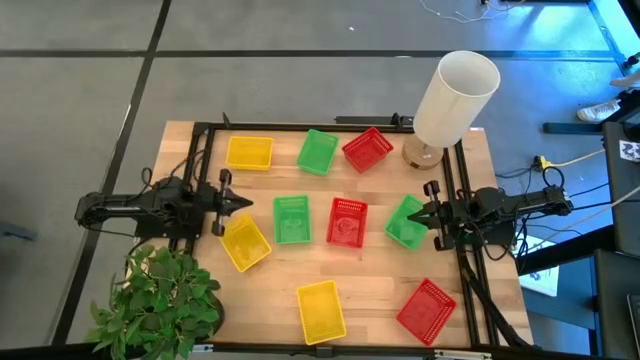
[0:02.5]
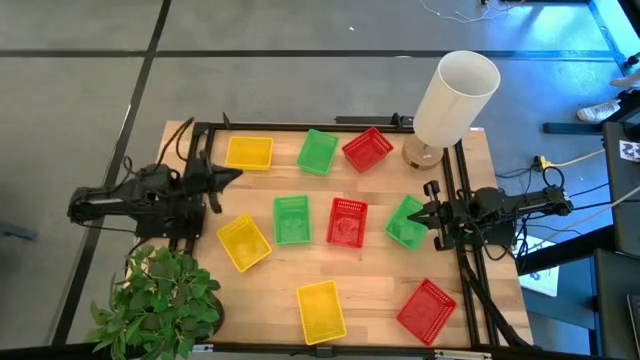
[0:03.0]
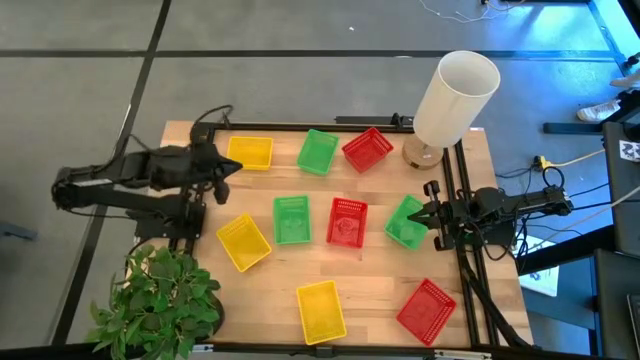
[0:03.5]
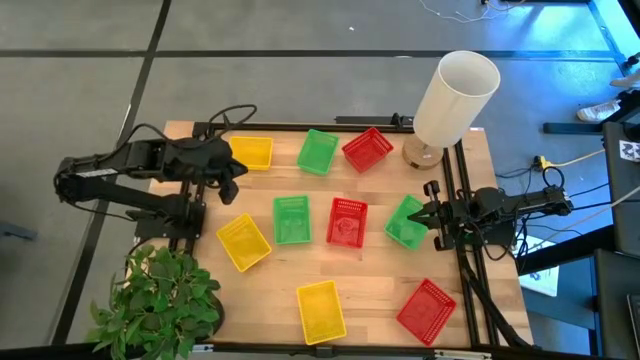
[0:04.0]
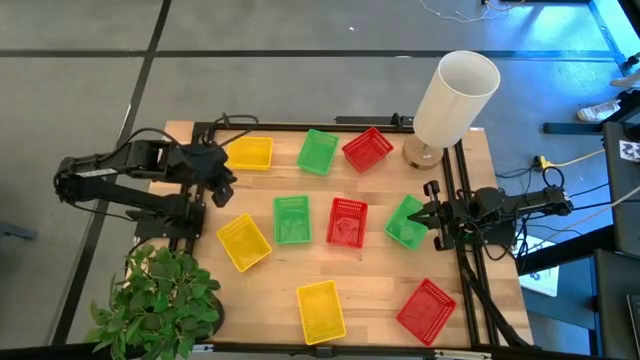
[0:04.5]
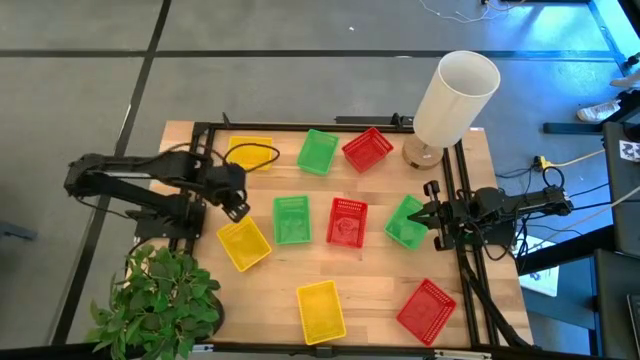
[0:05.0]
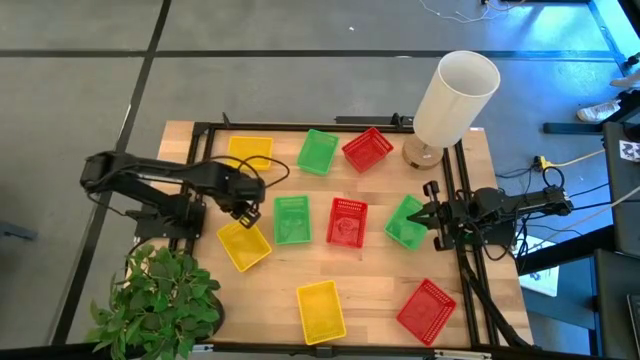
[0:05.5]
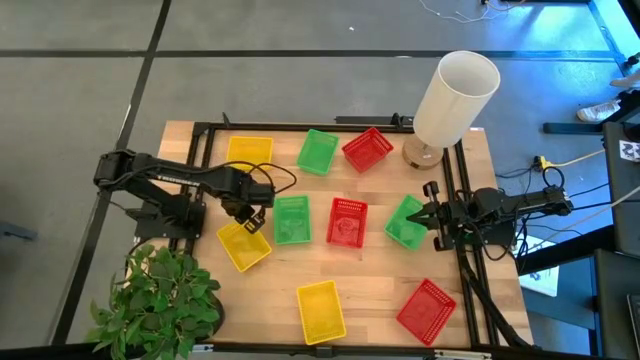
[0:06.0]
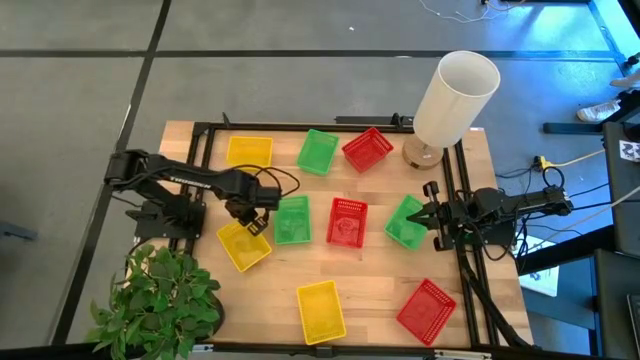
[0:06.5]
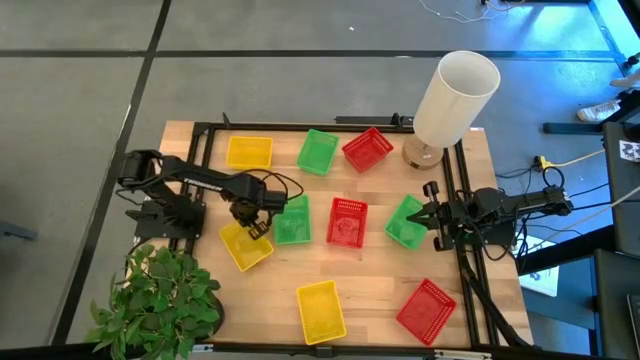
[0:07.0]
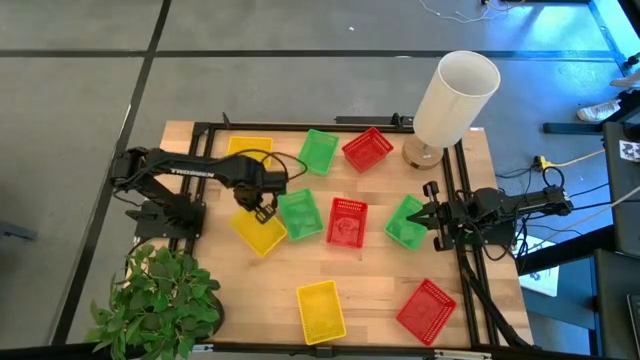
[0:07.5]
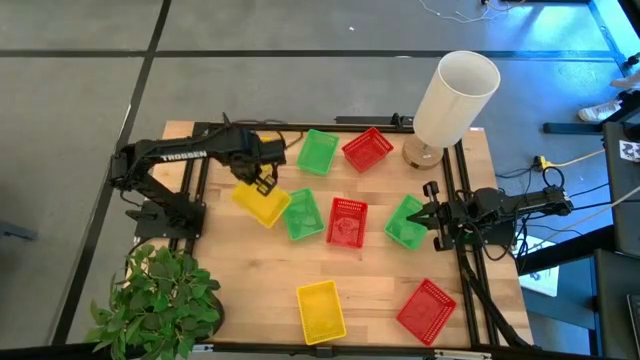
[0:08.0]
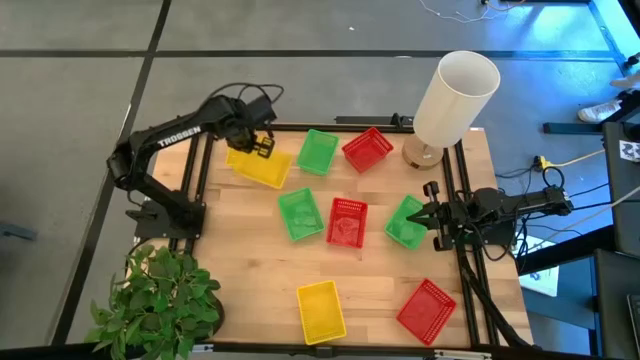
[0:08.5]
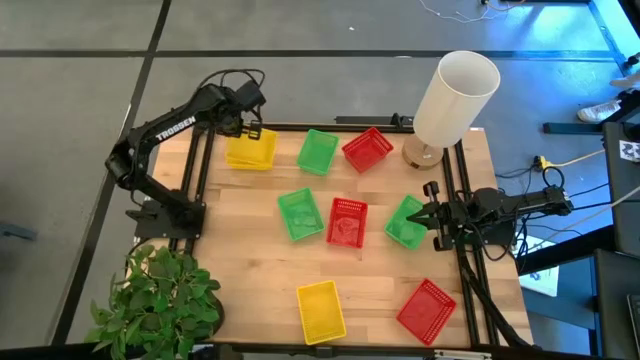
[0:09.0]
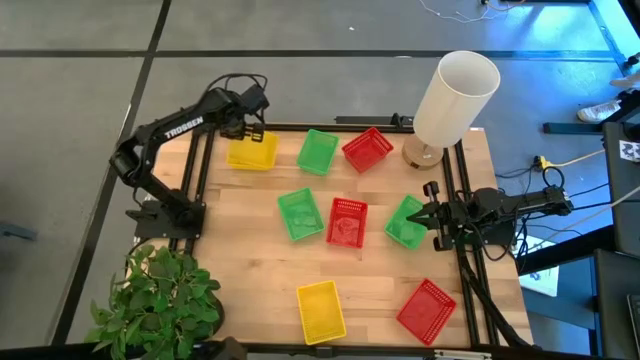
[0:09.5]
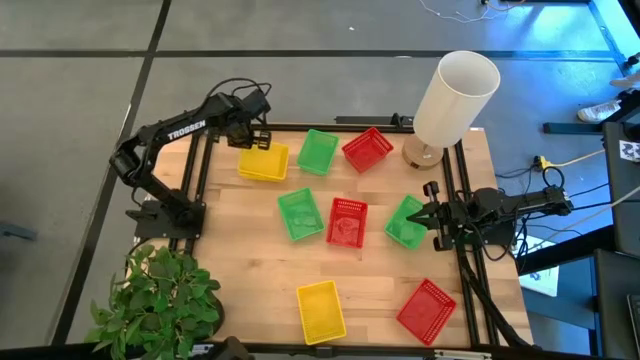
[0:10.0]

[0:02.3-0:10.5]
Stack the middle yellow bin on top of the top yellow bin

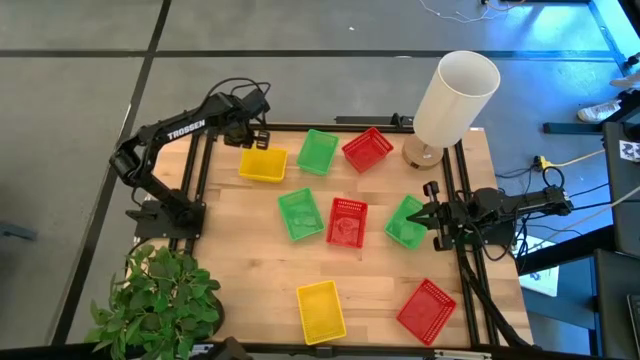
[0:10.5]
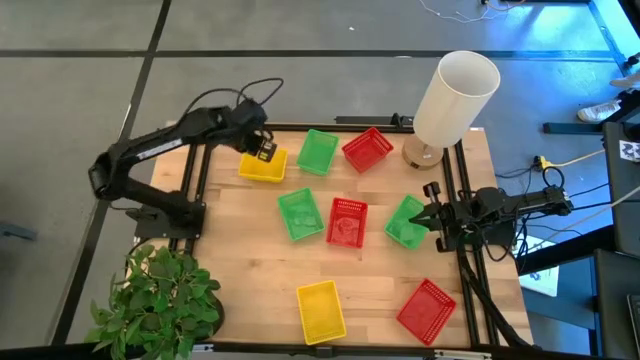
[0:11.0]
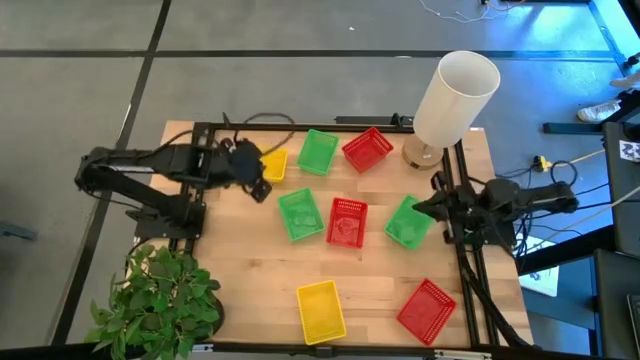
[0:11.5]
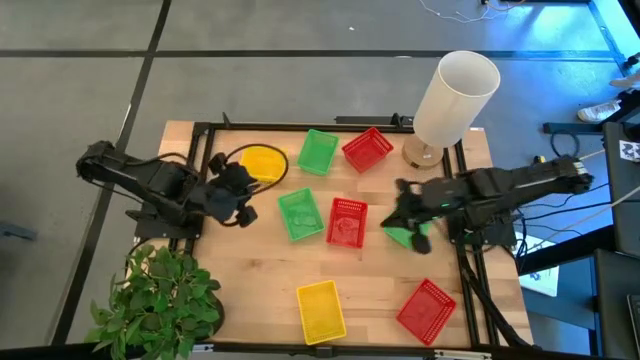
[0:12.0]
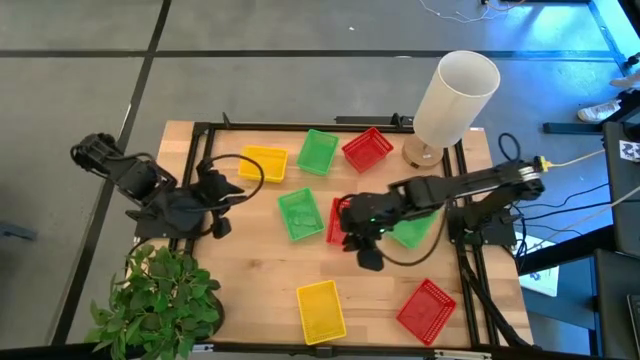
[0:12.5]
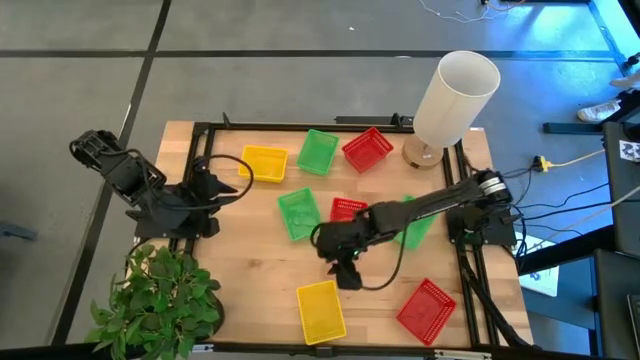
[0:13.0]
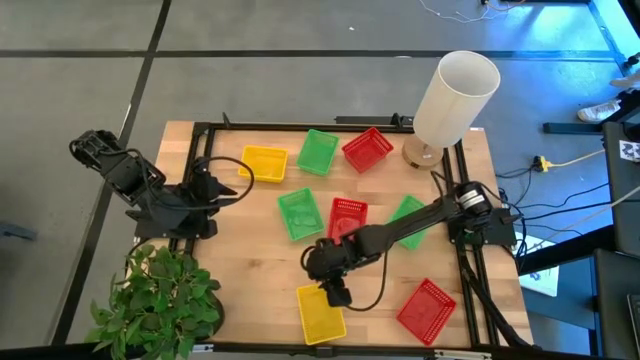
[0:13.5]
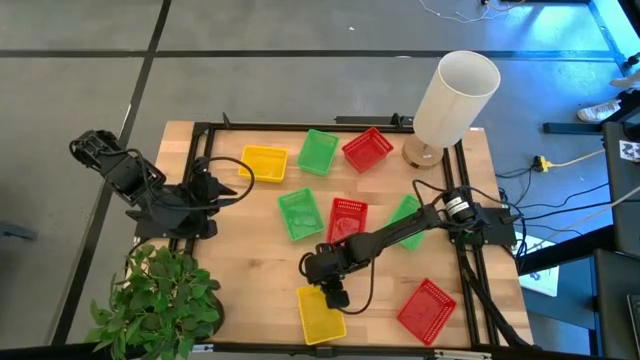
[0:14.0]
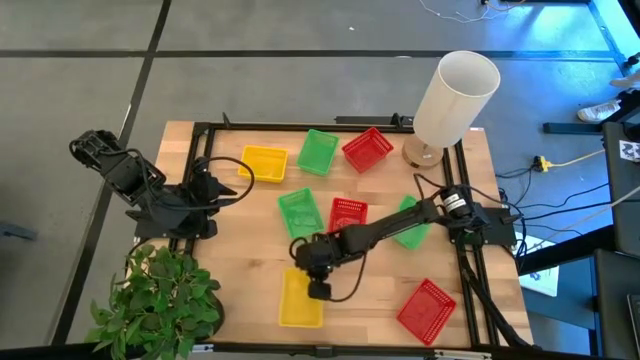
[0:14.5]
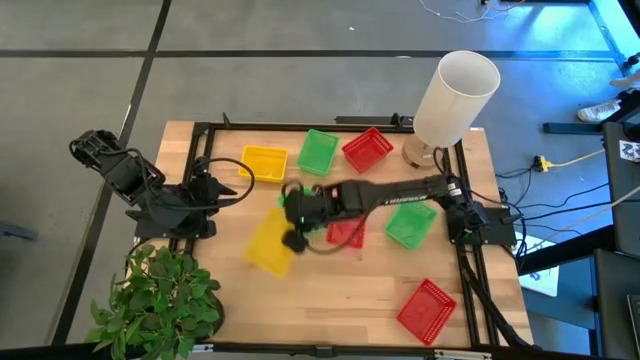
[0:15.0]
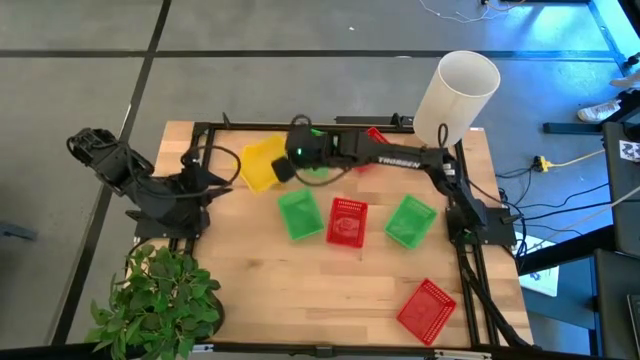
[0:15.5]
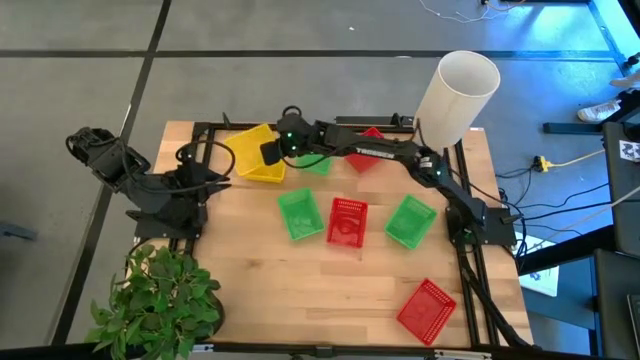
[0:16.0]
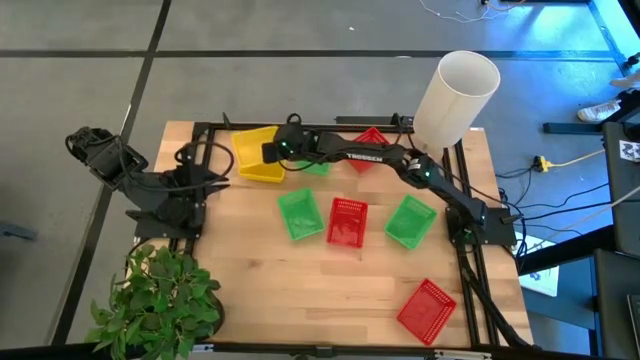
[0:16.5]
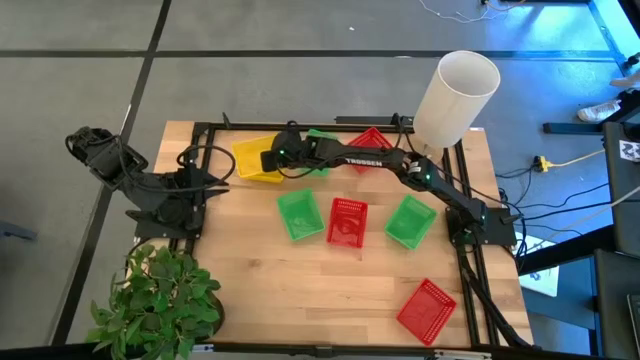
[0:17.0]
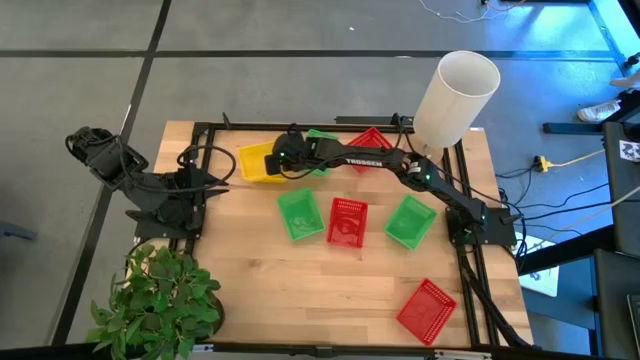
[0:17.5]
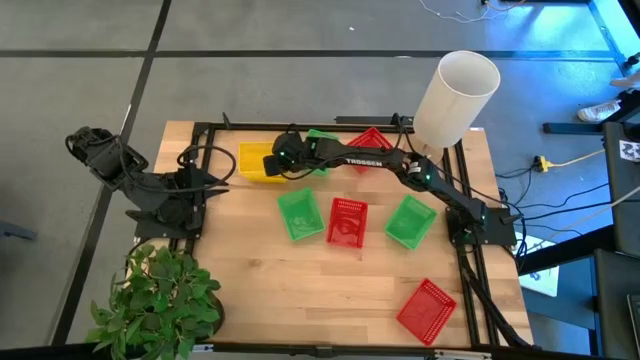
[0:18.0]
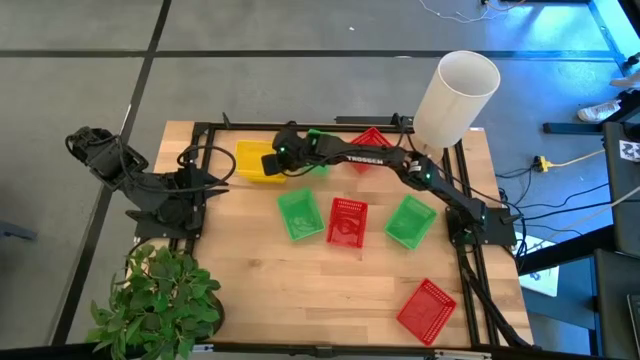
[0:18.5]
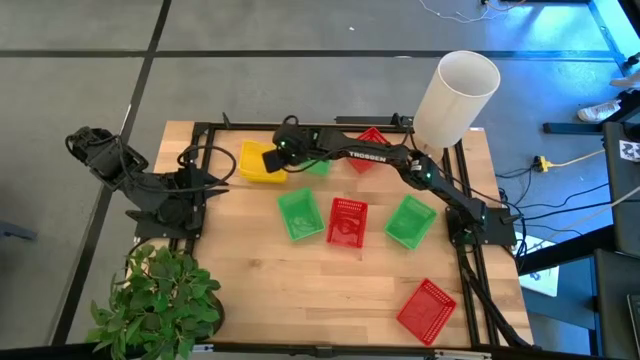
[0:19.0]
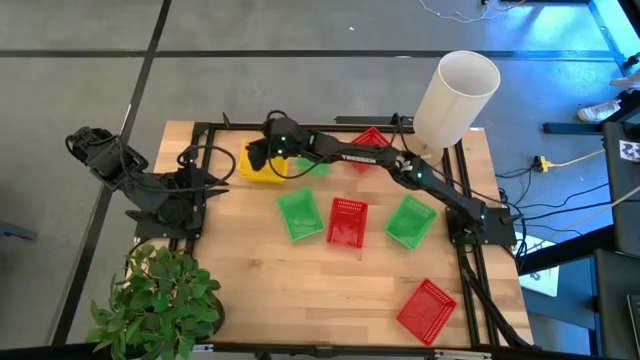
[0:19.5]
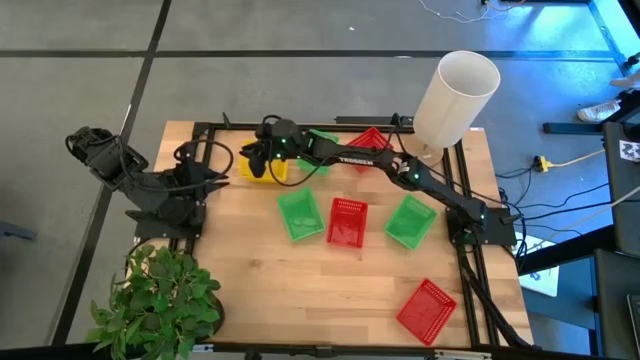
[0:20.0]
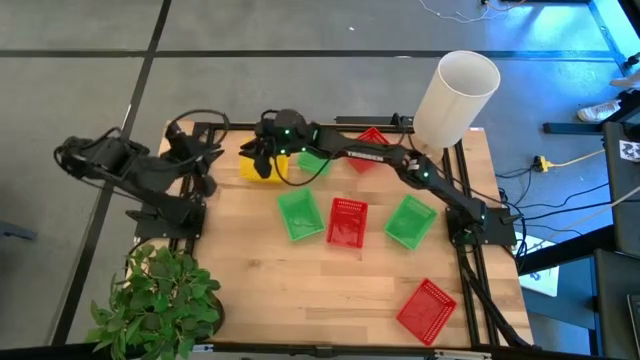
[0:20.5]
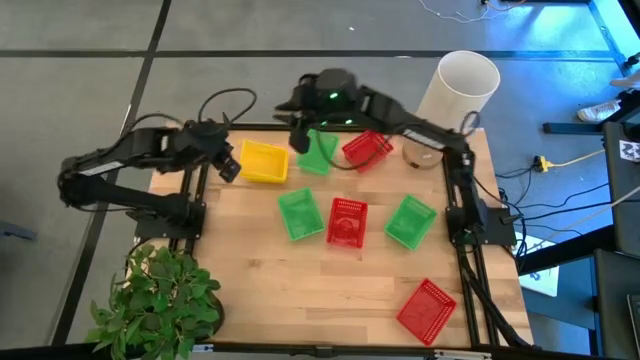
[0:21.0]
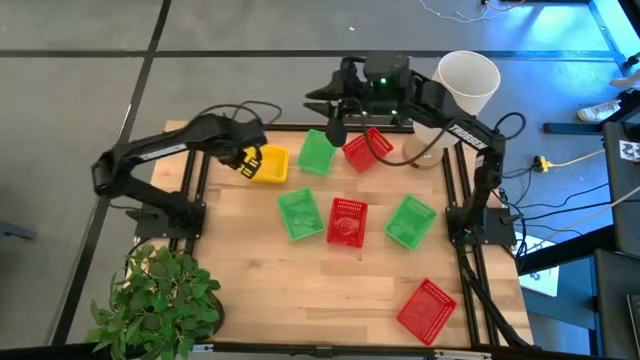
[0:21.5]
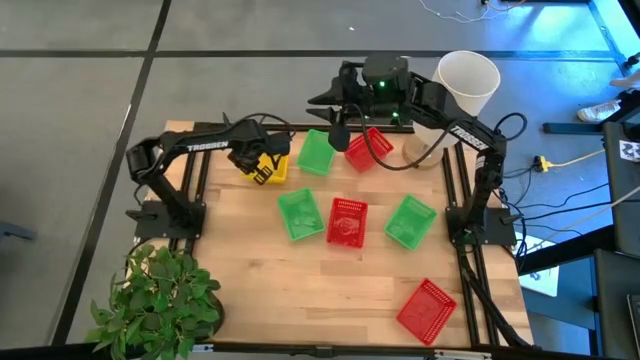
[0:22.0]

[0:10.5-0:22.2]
Stack the bottom yellow bin on top of the top yellow bins
